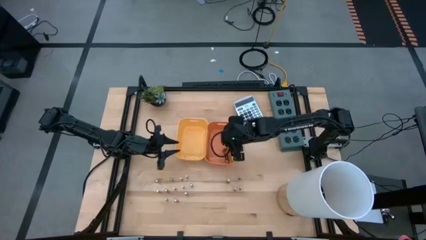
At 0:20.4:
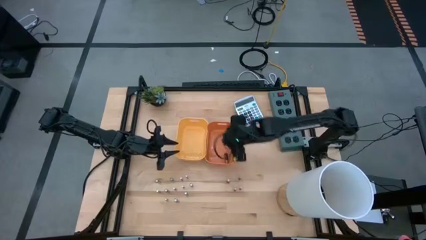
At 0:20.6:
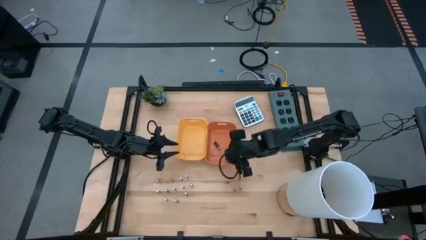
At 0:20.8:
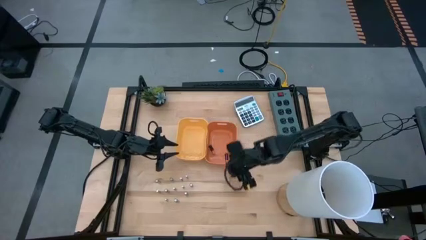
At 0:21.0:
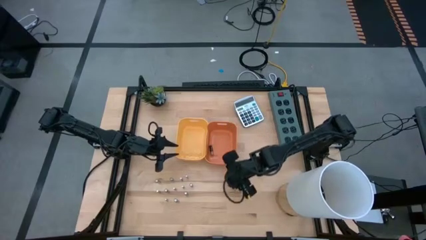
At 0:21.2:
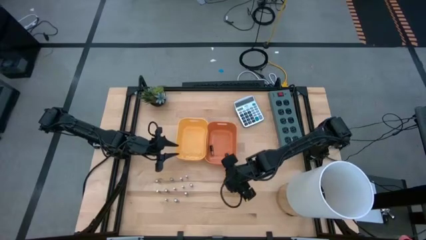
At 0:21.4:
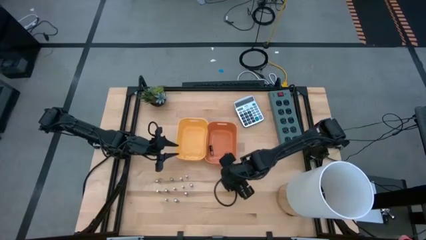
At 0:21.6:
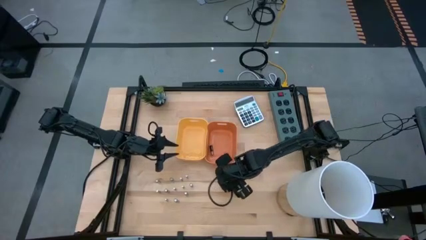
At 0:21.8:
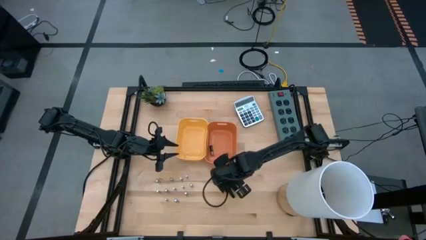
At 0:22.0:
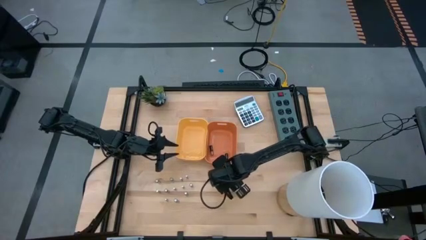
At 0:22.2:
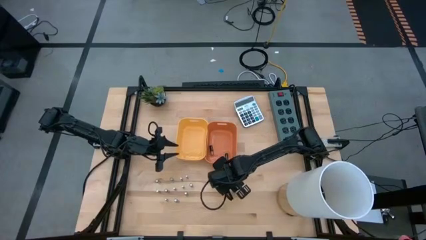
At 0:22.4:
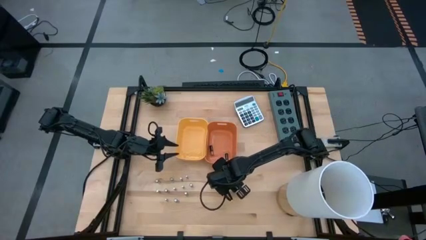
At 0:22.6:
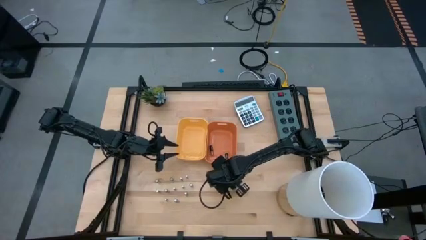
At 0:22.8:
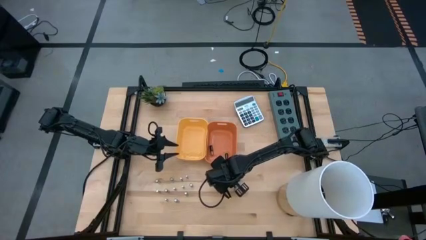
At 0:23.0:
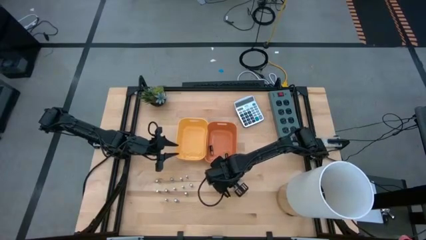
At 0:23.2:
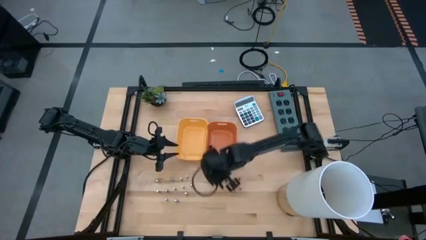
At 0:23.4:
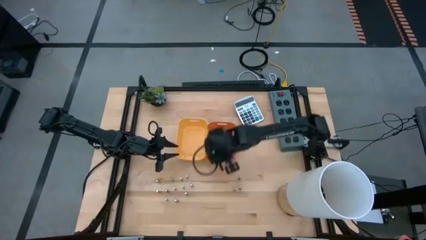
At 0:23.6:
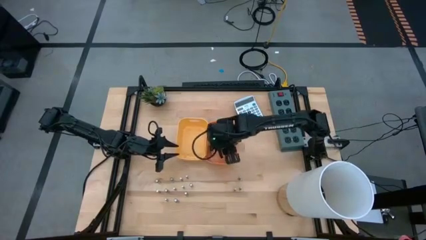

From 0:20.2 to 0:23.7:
Task: Sort batteries
Put the black battery into the orange bin

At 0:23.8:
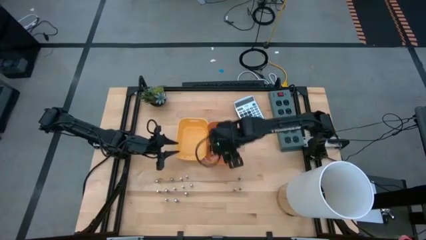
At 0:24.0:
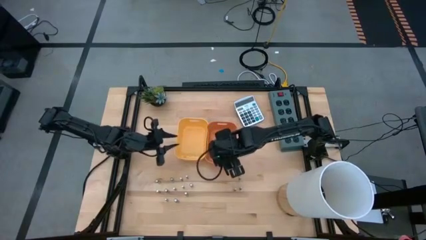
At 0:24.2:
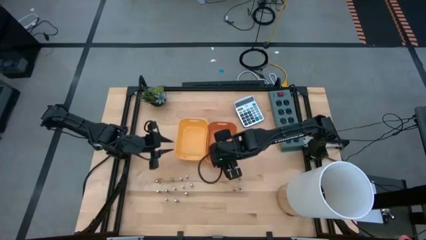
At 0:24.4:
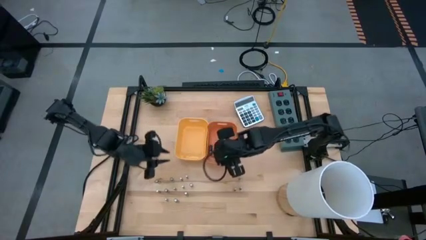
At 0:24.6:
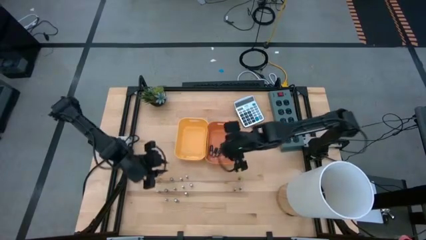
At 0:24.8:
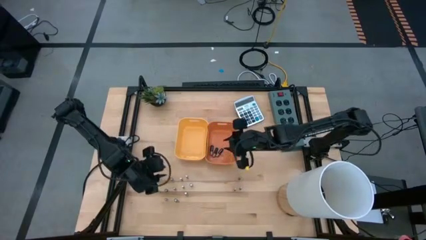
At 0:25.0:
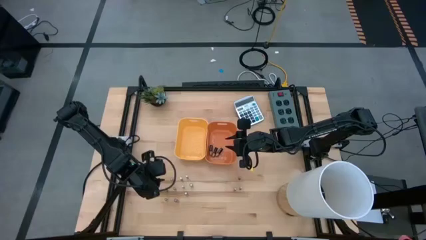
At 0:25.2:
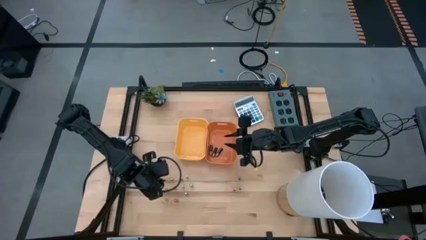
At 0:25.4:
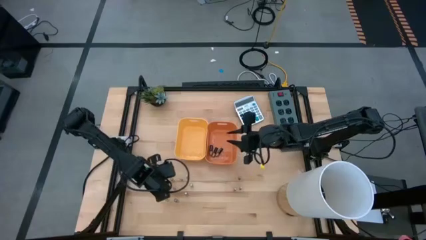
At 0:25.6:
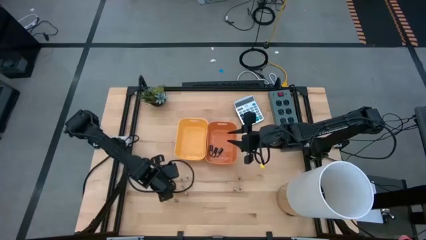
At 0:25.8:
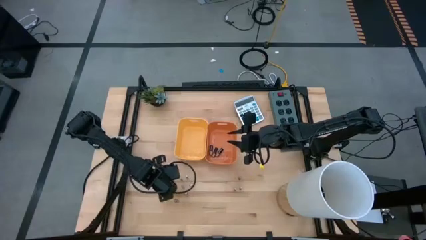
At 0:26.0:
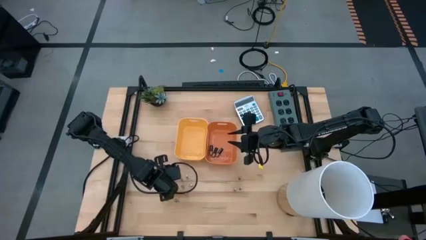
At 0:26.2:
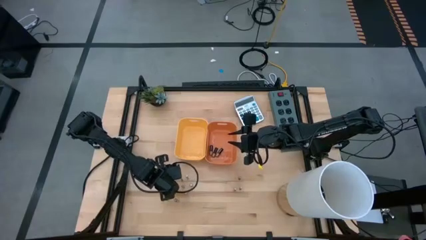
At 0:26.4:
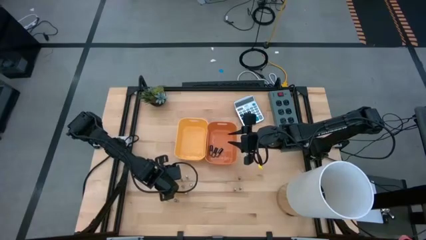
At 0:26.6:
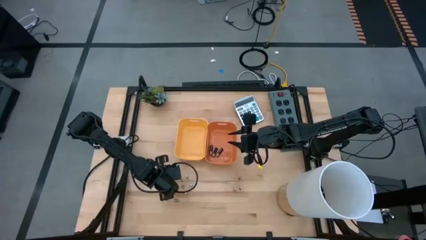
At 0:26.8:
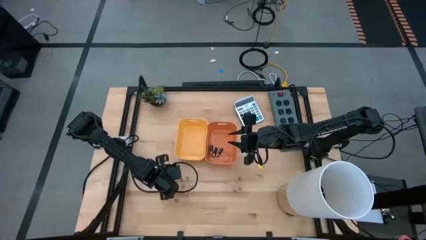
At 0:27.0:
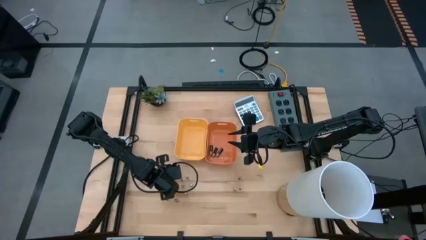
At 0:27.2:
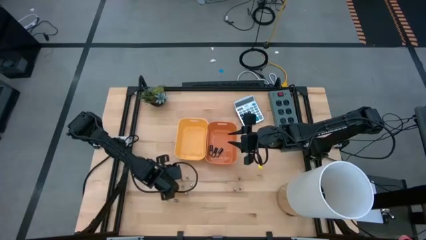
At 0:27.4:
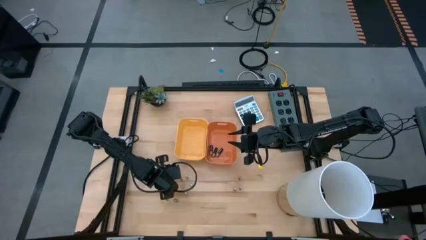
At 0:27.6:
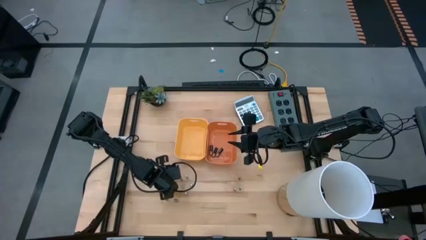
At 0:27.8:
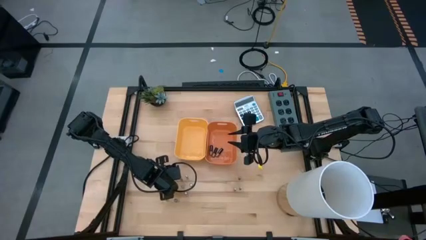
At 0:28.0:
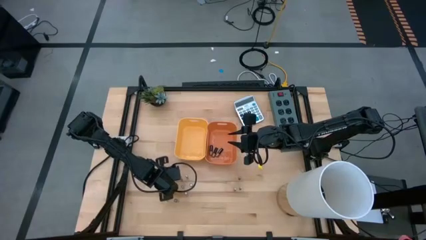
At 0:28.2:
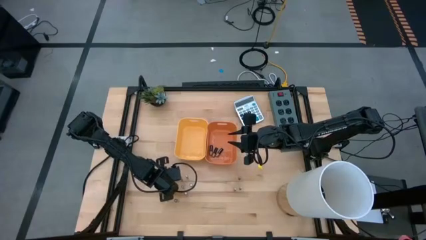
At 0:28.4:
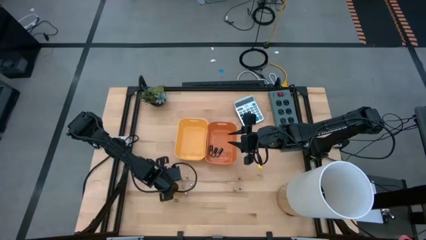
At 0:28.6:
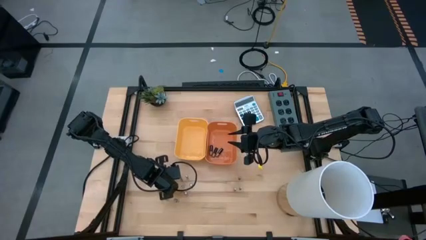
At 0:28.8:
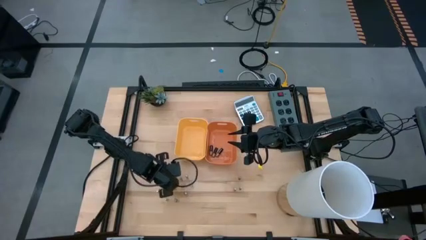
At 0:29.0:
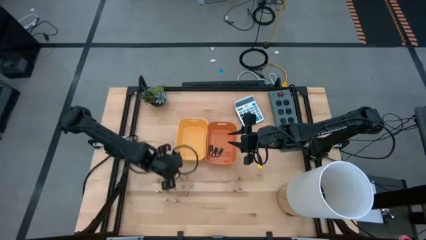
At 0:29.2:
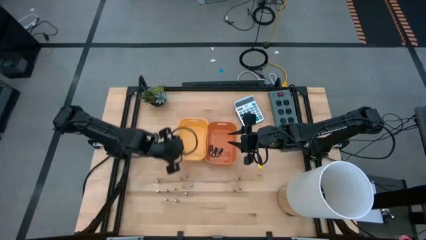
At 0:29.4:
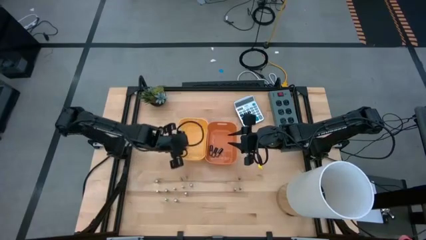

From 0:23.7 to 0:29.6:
Put the silver battery into the yellow bin

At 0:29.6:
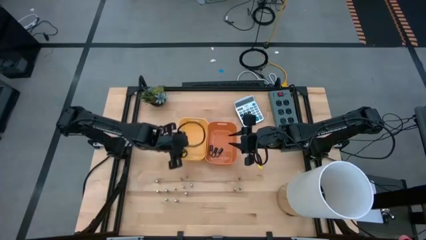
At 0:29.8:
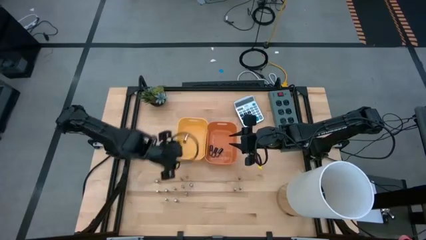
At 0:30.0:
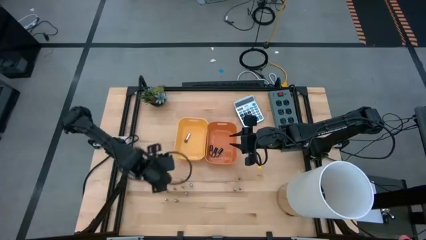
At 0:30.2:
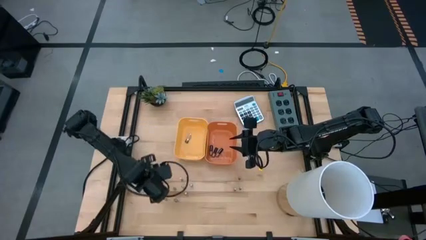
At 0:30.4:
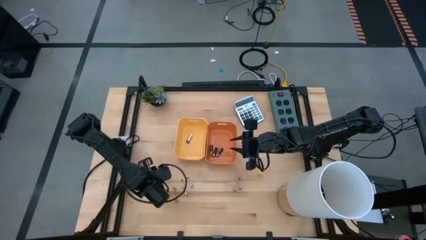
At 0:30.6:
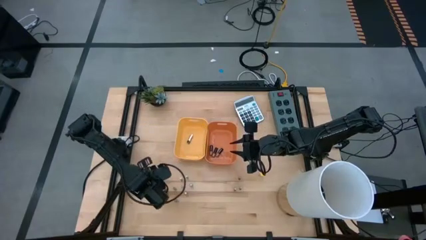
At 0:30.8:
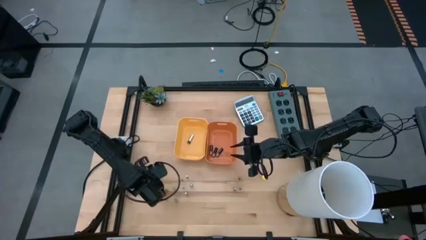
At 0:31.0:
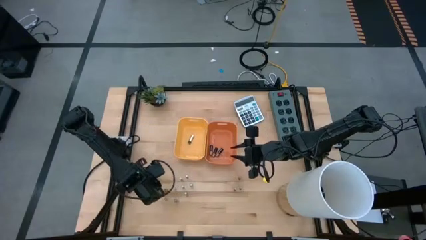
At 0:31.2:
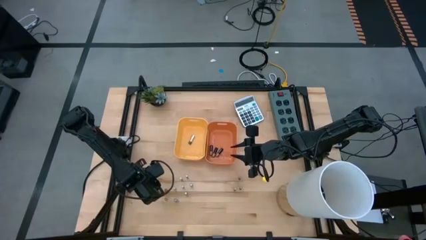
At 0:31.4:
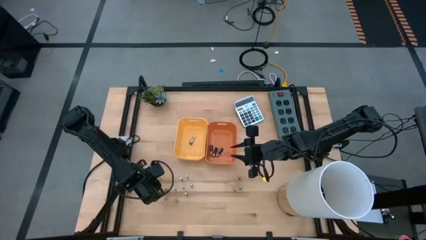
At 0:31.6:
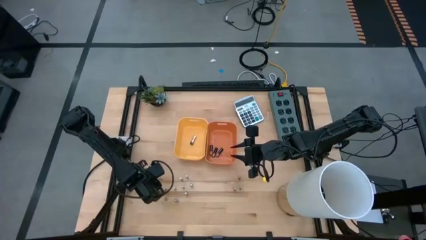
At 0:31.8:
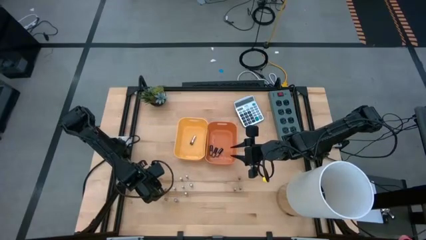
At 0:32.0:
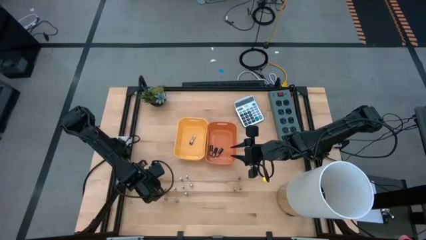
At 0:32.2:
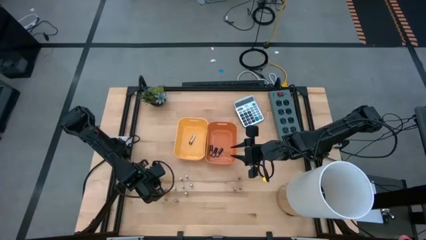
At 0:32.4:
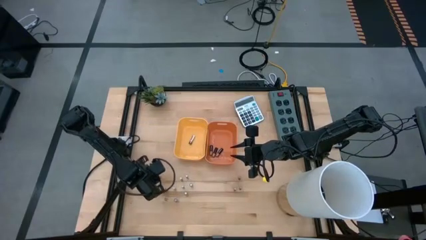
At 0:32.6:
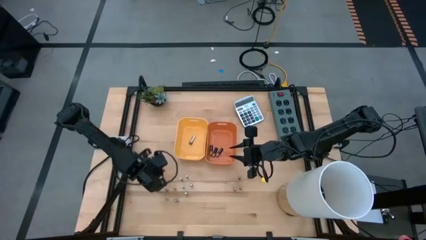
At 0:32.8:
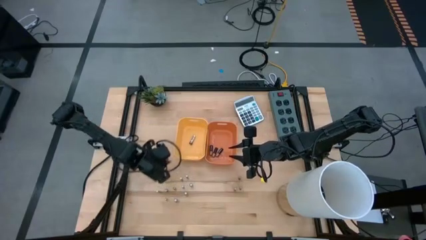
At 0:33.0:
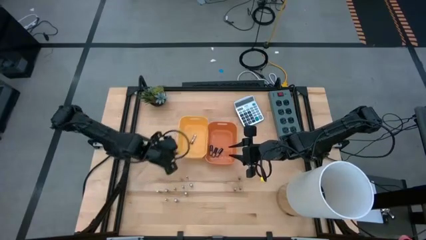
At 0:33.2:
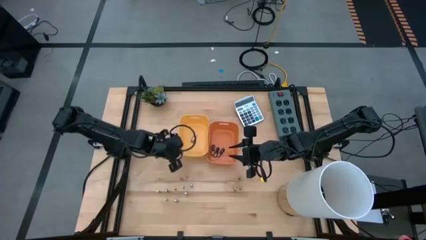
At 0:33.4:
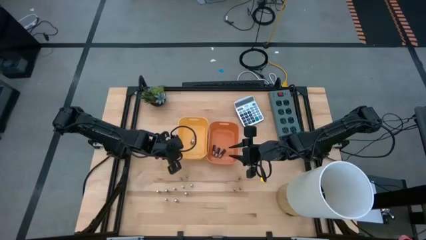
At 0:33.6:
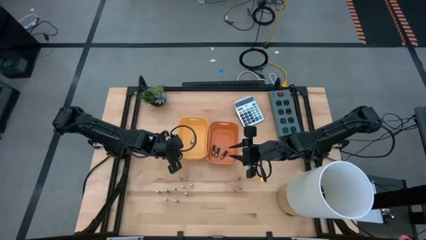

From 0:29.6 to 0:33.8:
Put the silver battery into the yellow bin

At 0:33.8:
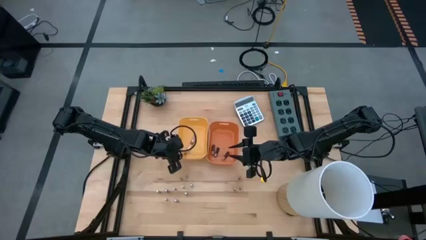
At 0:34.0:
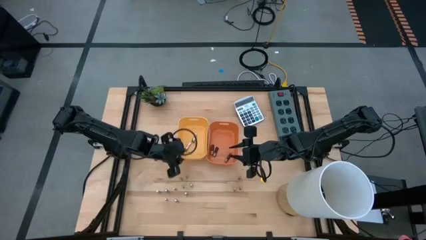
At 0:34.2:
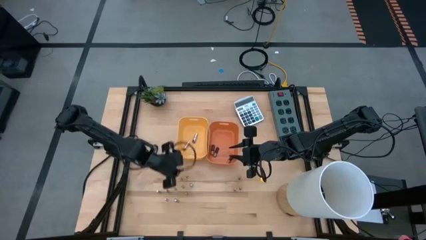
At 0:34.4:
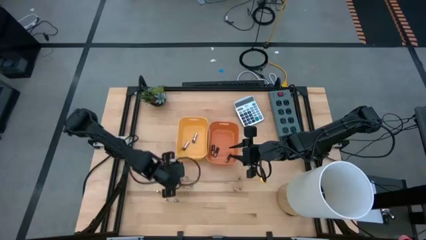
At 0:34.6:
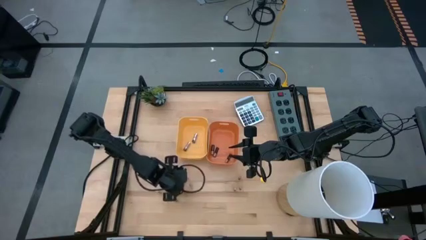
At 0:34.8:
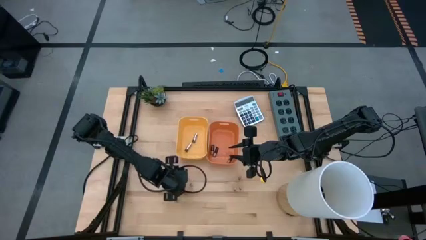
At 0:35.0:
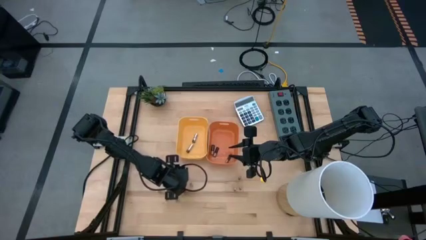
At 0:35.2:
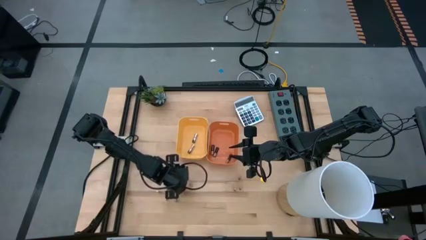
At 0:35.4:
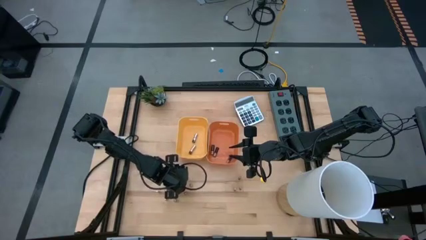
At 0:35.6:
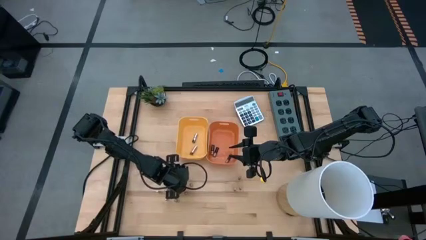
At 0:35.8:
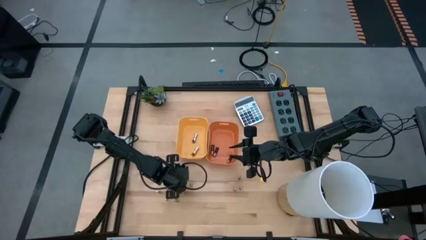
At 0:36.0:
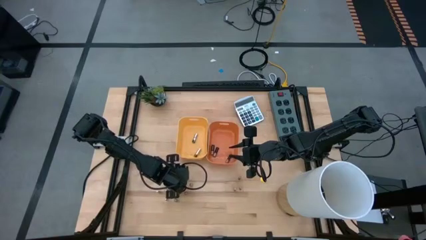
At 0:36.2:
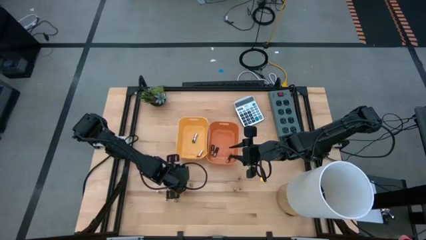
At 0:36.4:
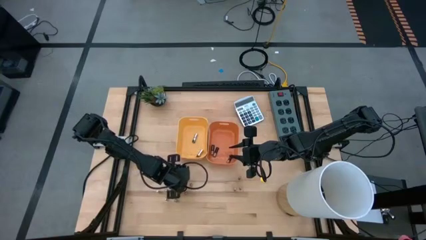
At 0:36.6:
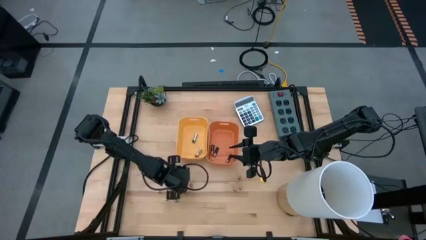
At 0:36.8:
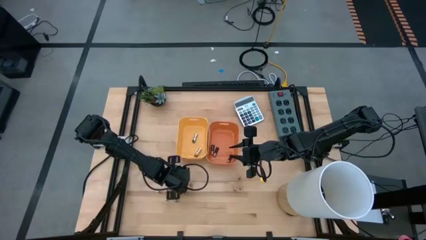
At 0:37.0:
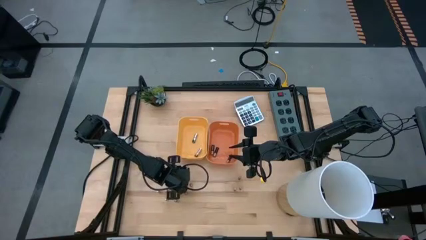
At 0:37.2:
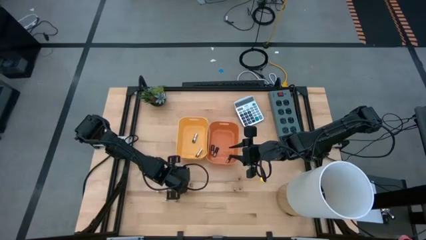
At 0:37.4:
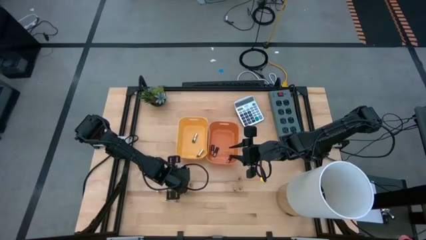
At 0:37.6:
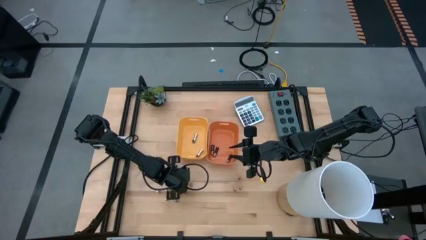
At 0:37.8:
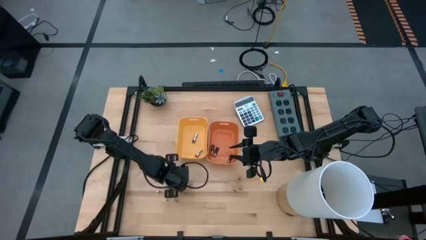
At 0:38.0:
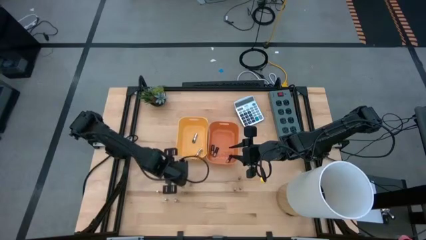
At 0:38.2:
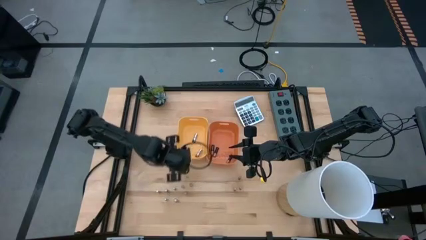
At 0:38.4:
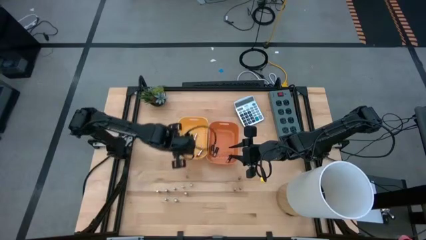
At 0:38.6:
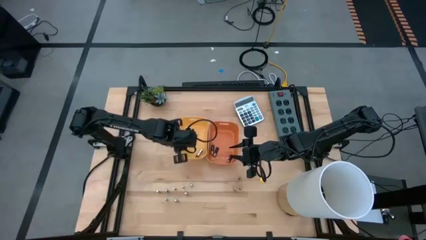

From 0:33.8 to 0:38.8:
Put the silver battery into the yellow bin
